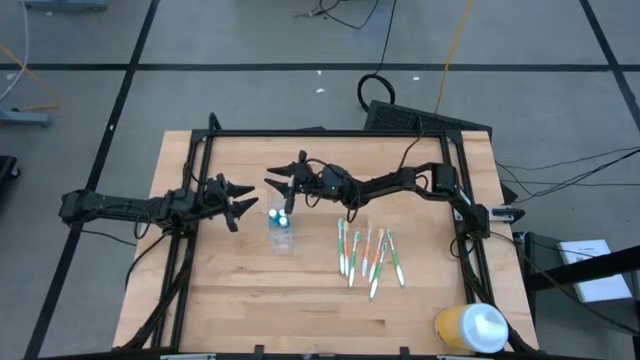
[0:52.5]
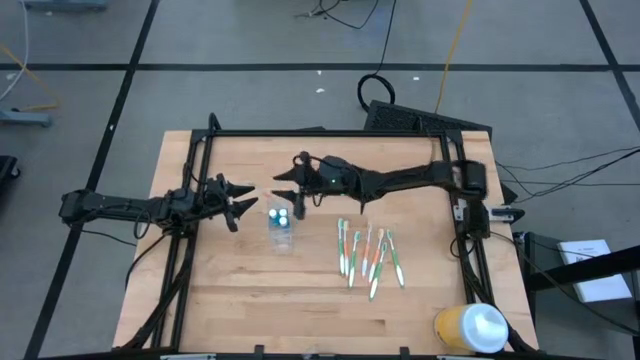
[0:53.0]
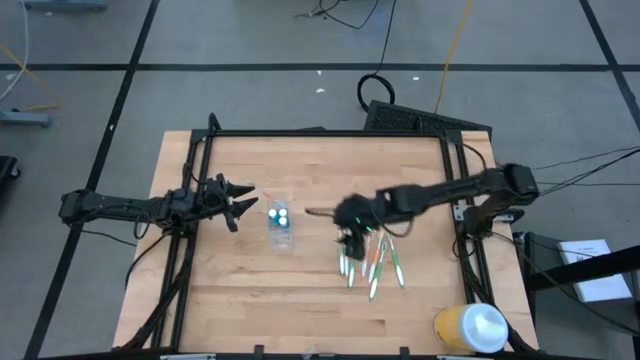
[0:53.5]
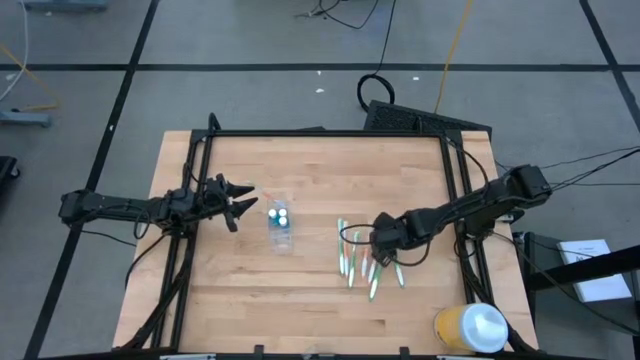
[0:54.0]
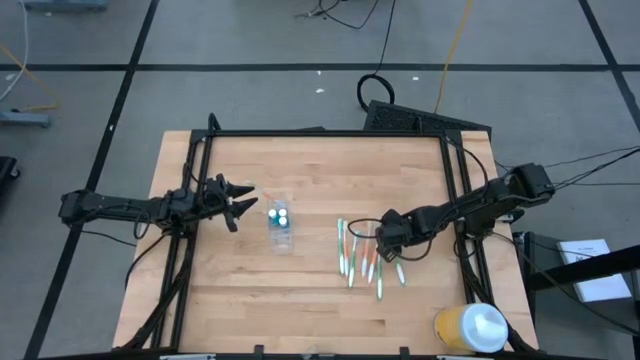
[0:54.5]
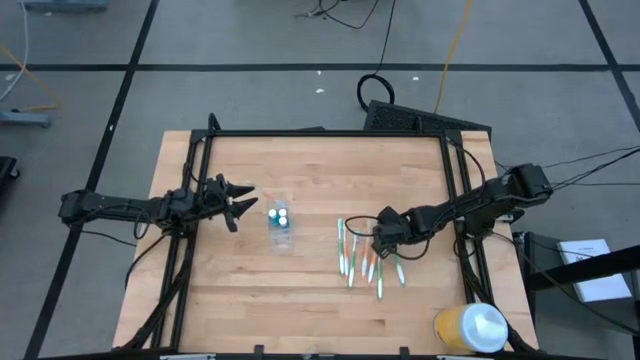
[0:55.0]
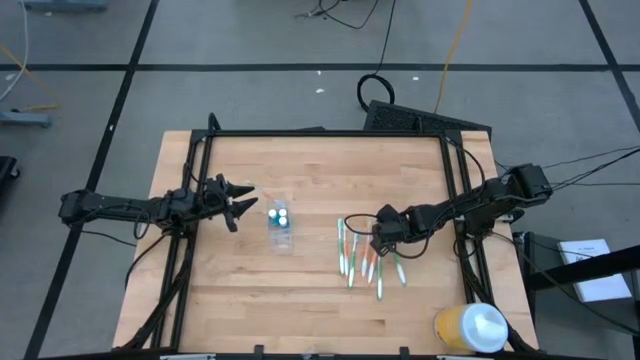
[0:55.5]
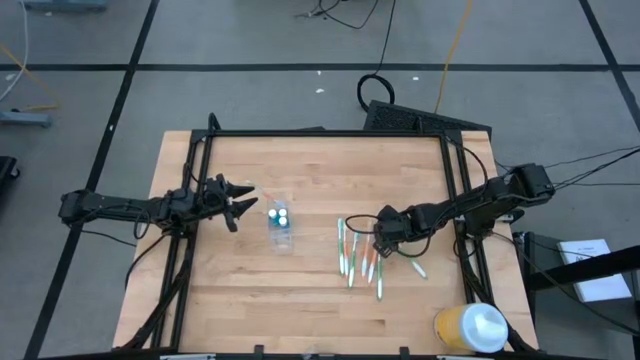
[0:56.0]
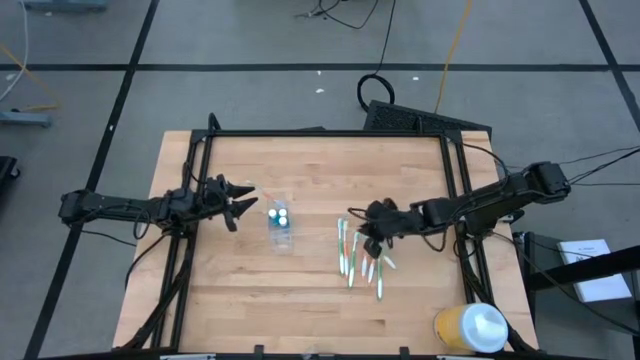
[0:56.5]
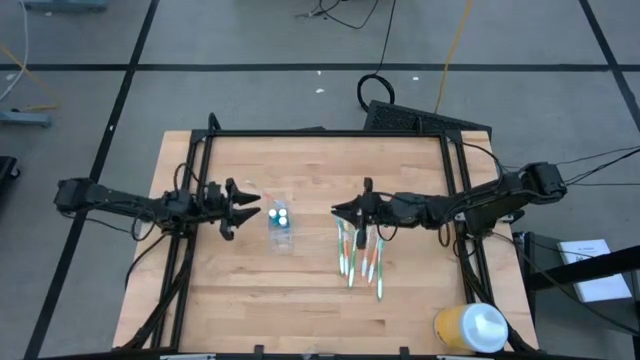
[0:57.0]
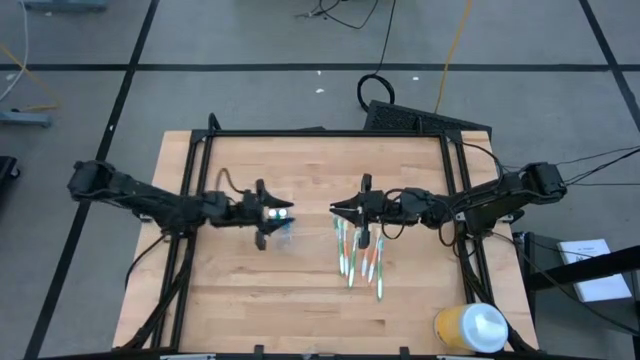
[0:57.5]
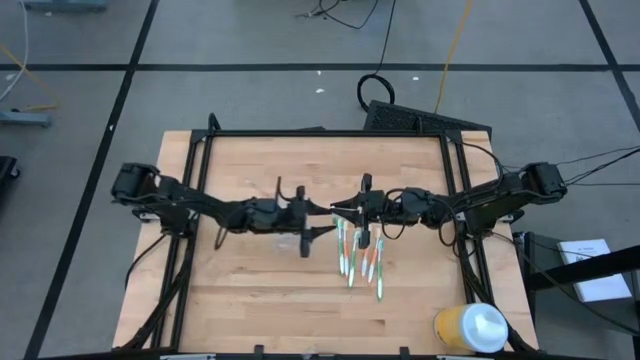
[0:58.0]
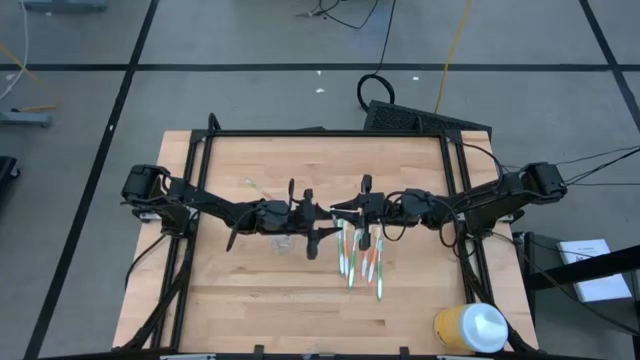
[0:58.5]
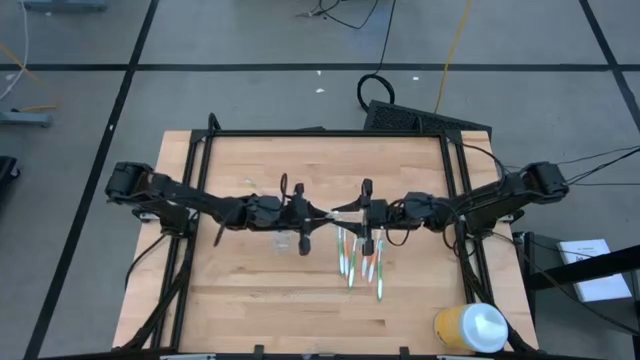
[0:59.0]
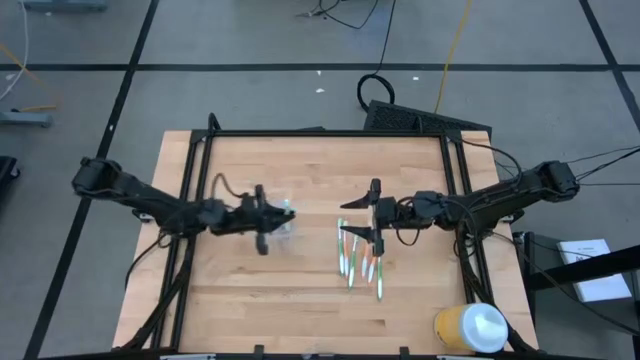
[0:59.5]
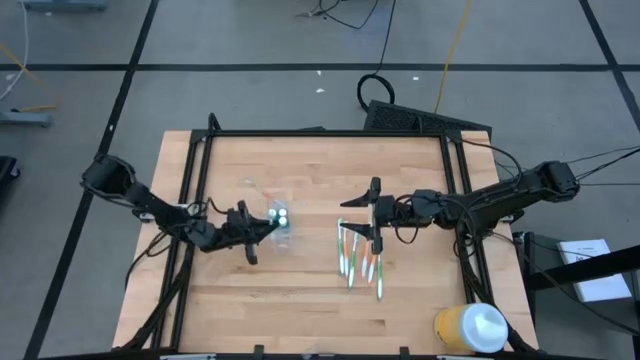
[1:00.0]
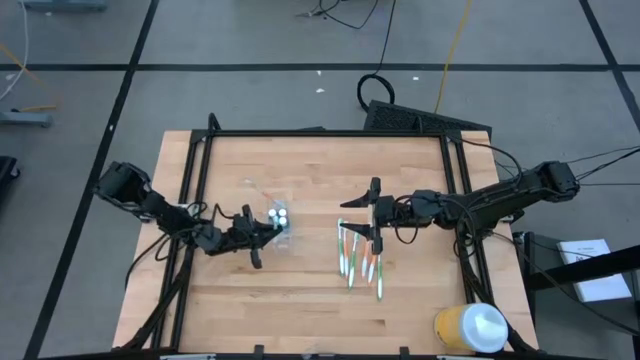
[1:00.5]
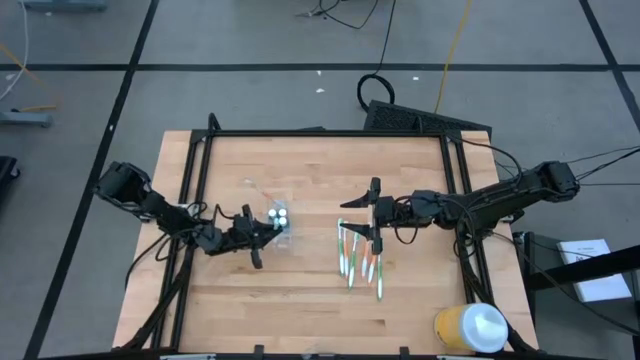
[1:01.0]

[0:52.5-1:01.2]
Task: Pick & Place toothbrushing station
Put the green toothbrush in the transparent organizer

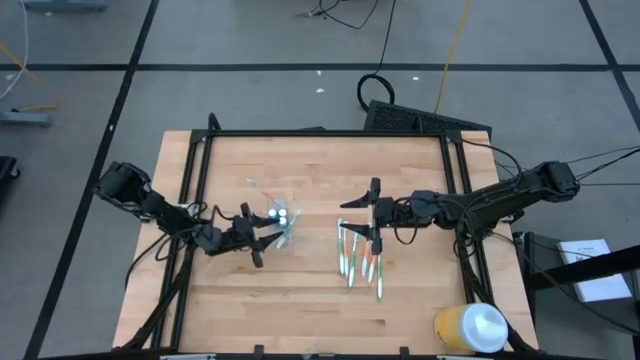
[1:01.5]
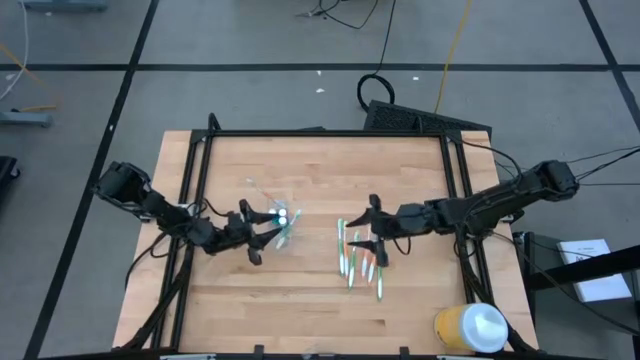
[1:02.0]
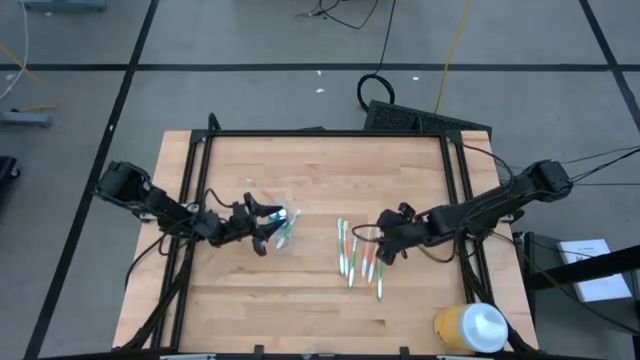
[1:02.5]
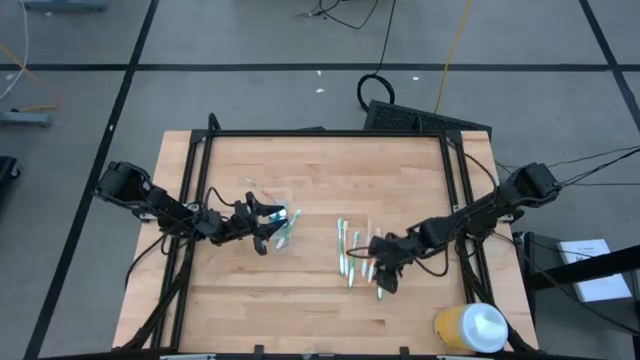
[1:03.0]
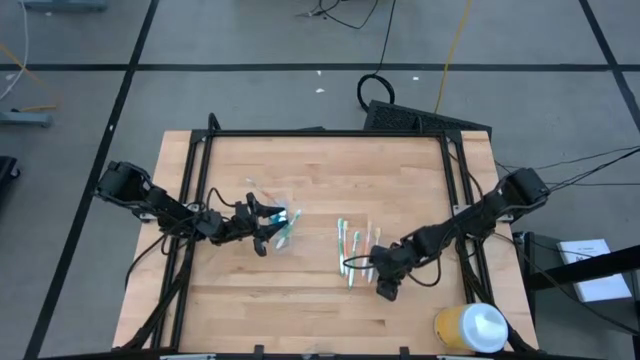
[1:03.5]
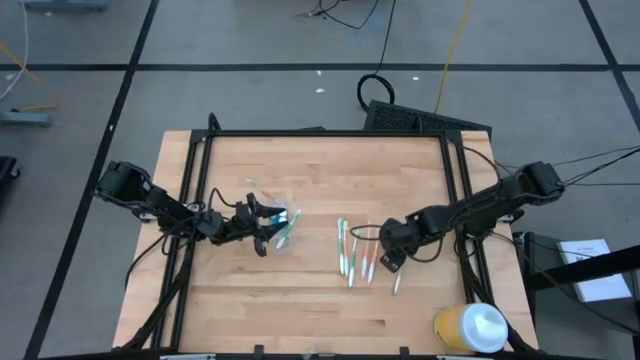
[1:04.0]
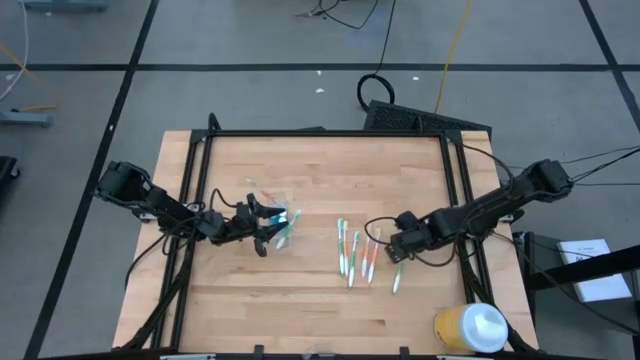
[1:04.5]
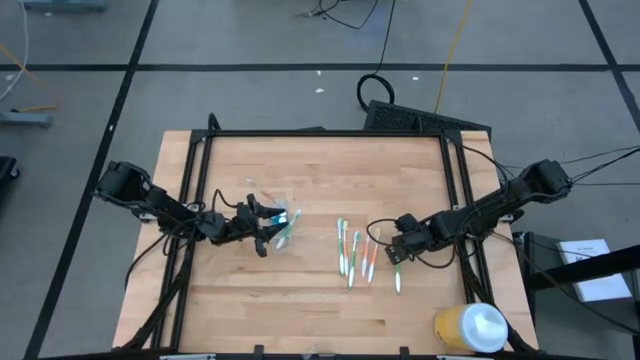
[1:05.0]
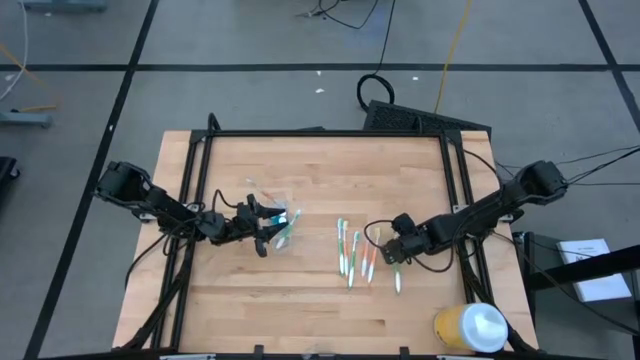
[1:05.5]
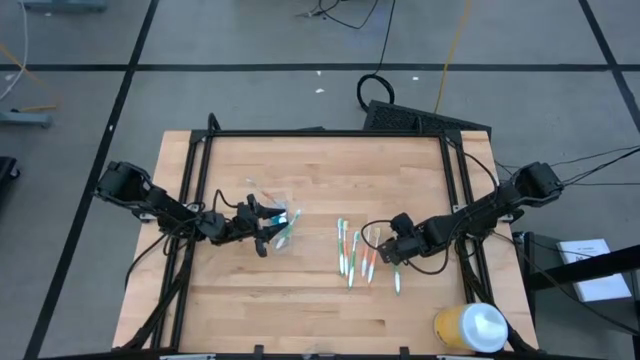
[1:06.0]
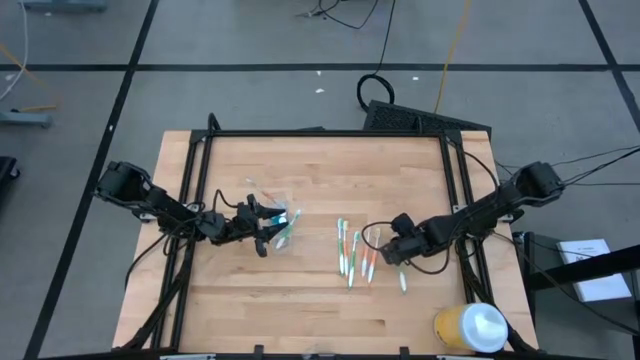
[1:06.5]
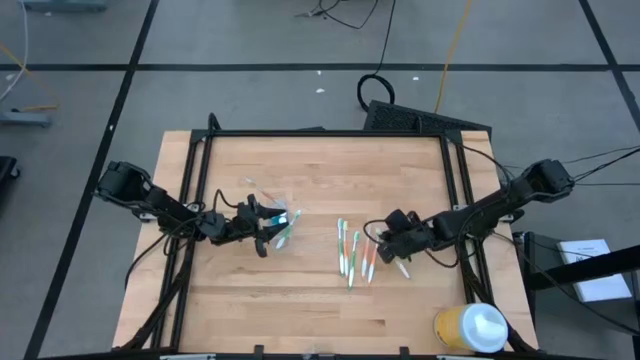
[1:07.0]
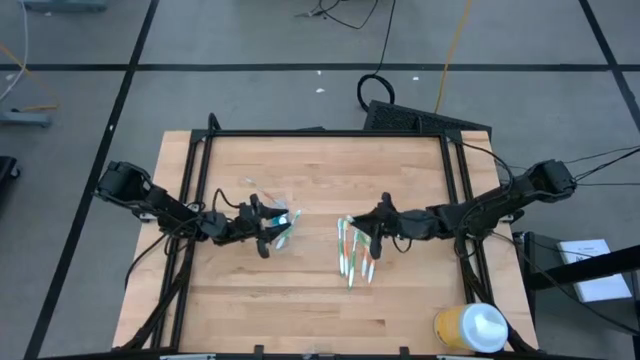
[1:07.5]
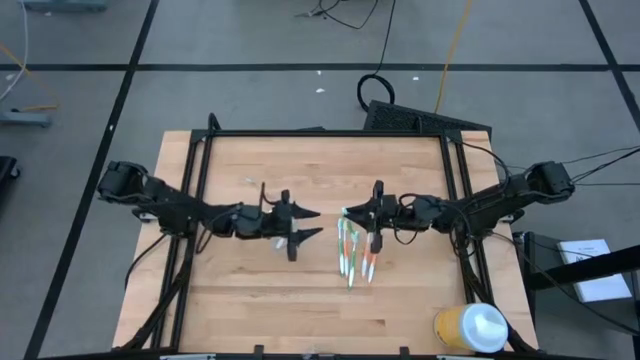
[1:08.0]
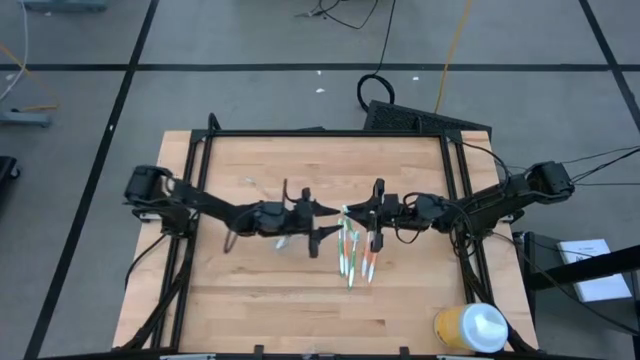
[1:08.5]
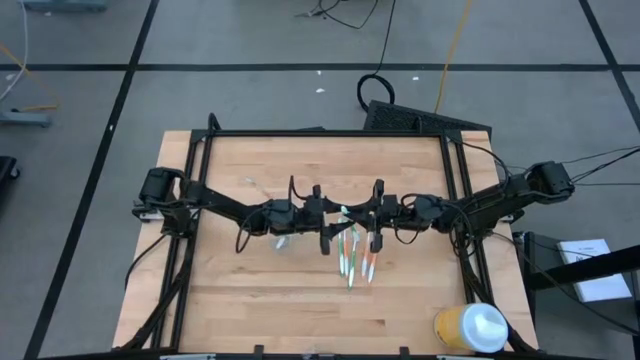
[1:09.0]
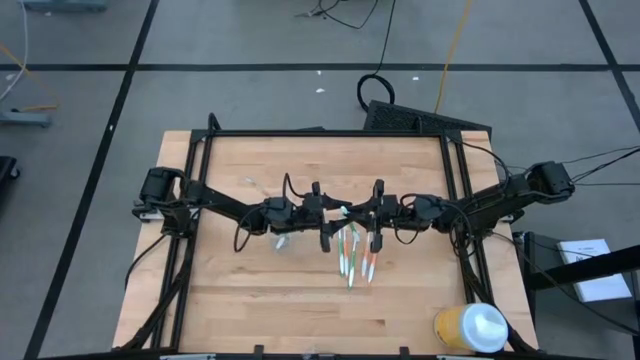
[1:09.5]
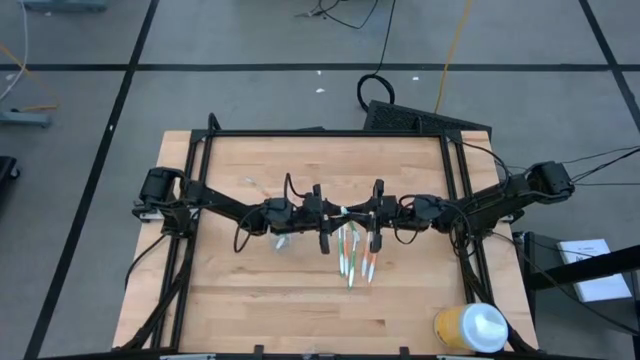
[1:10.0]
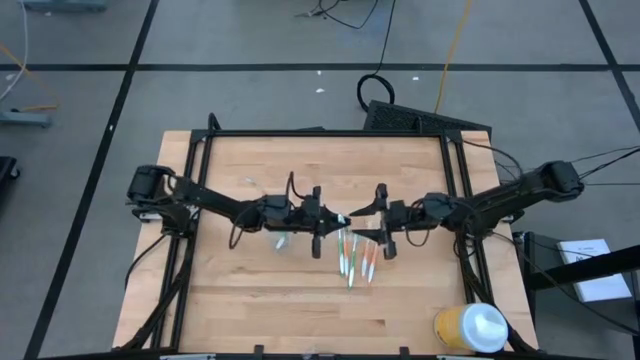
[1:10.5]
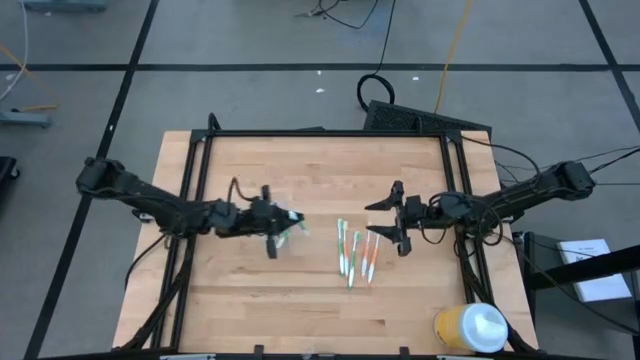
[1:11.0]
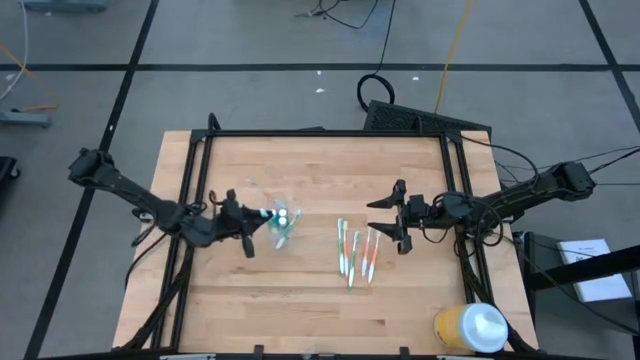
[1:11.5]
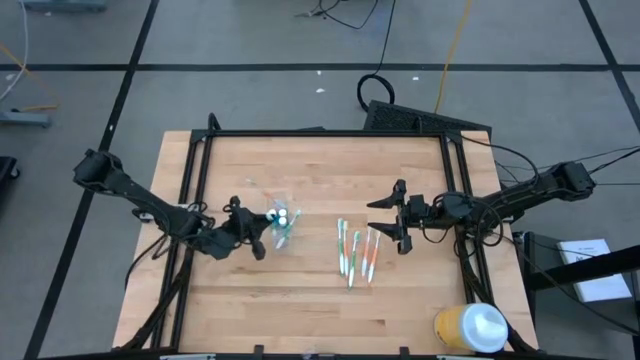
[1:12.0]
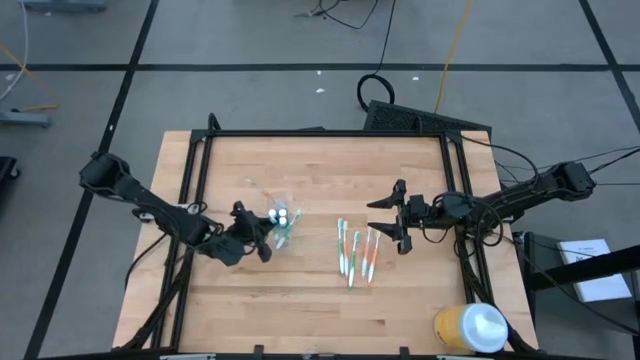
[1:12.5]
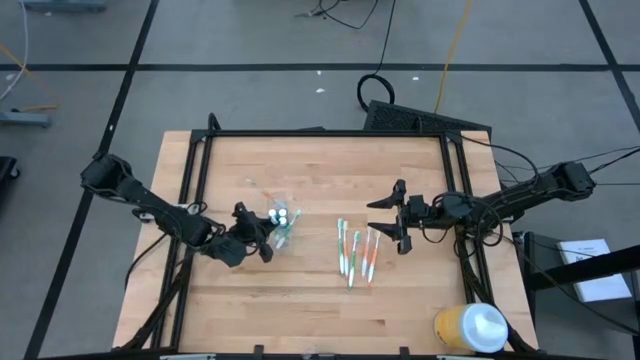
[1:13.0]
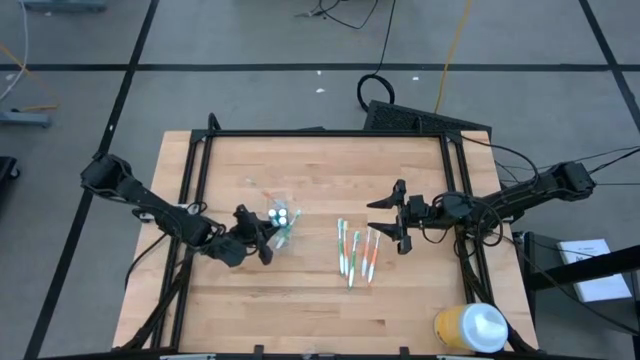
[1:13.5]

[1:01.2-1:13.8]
Put the green toothbrush in the transparent organizer

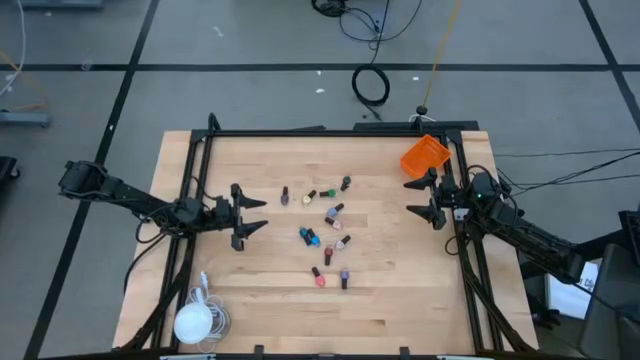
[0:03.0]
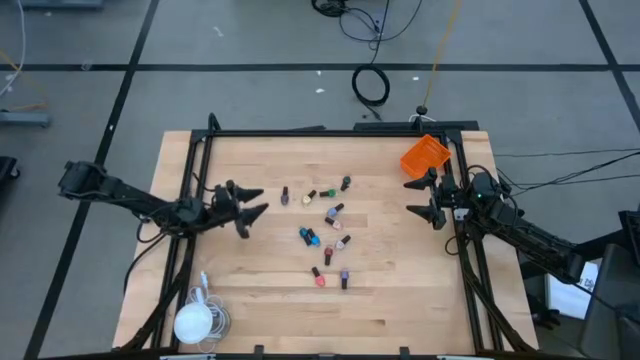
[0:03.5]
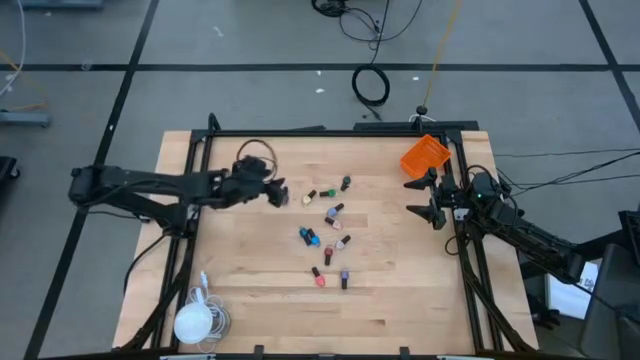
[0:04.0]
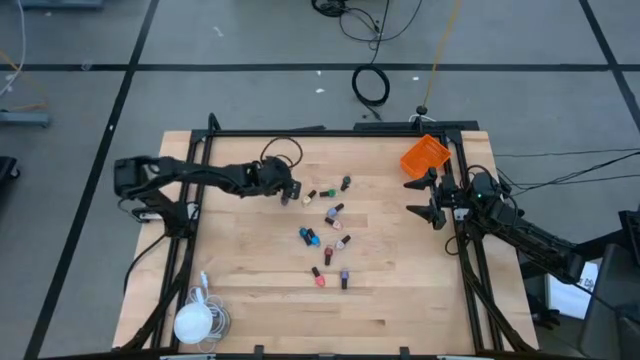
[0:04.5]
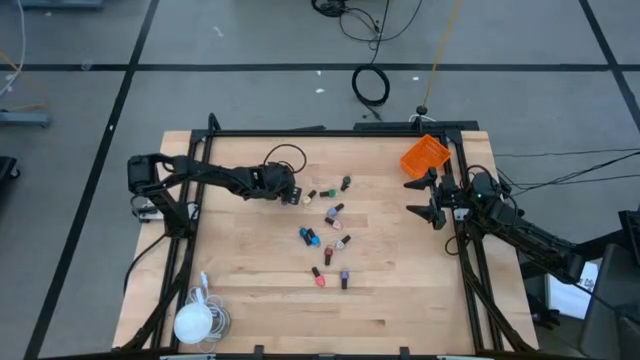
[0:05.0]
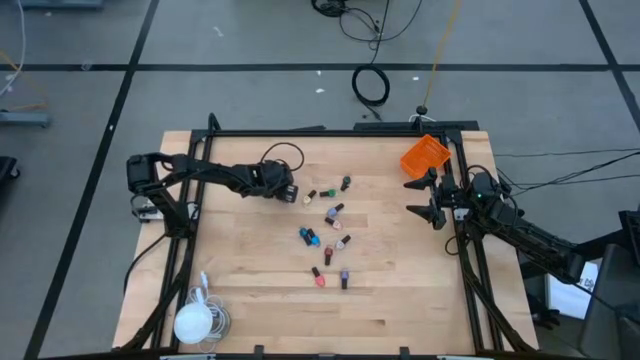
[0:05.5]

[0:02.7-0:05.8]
Task: Pick & Place Nail Polish
Put the top violet nail polish bottle into the orange basket
